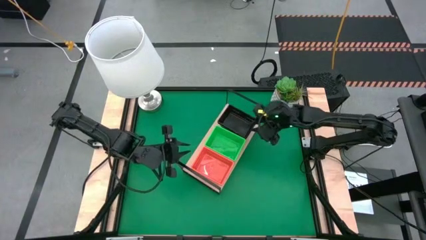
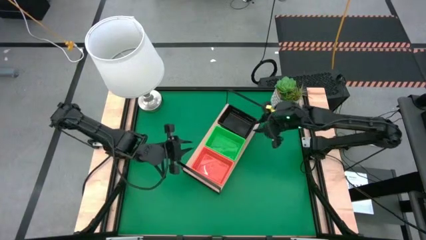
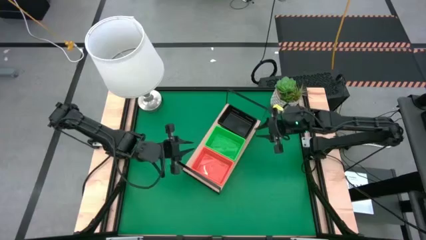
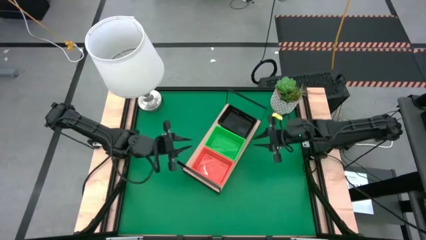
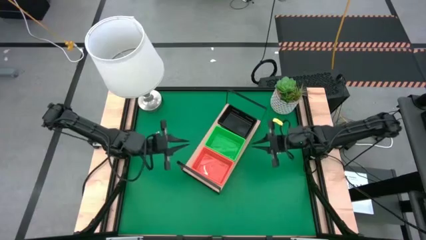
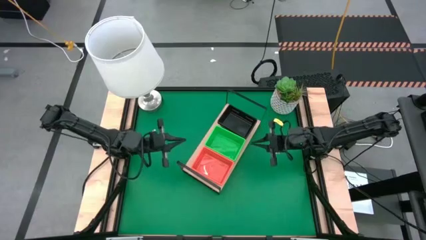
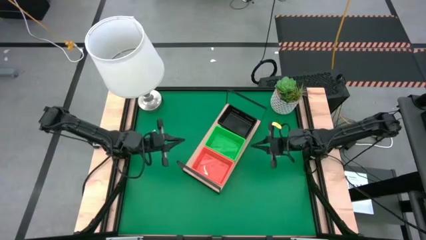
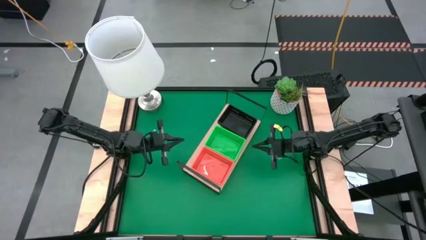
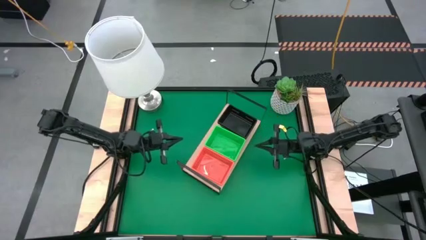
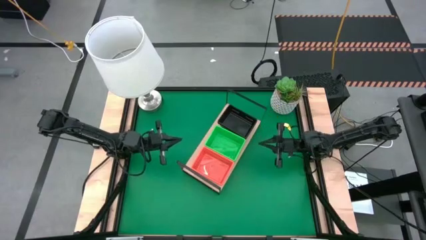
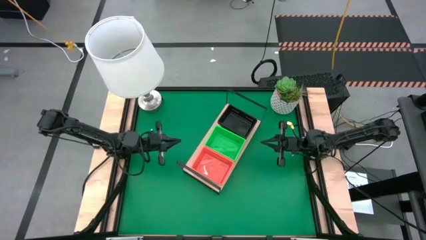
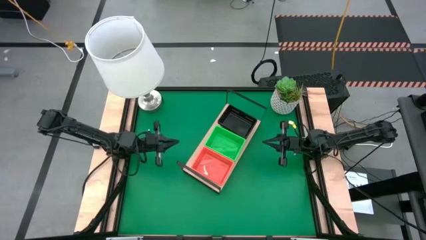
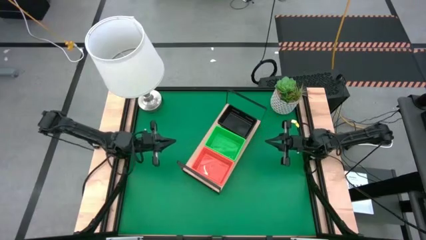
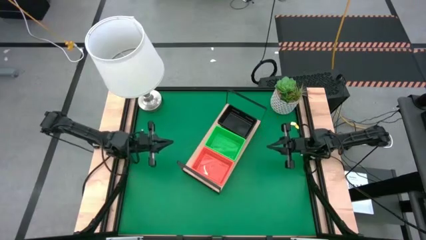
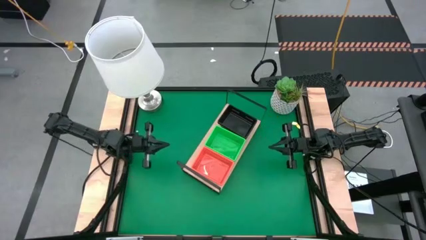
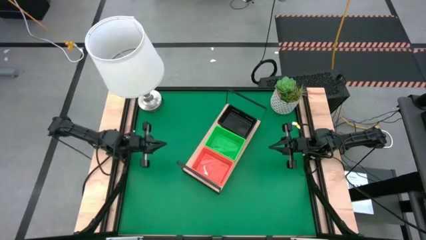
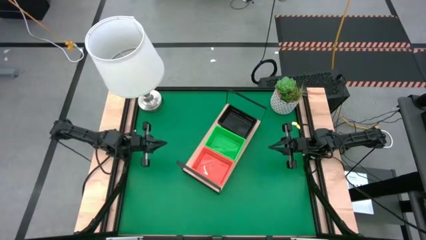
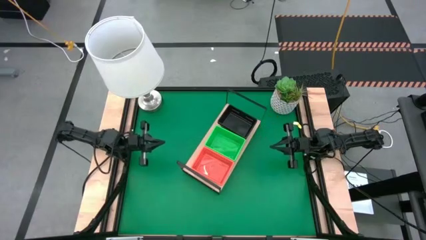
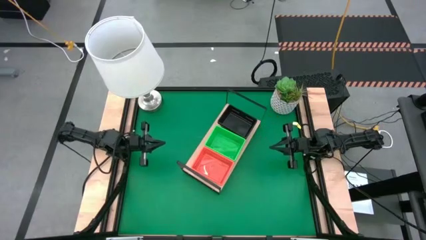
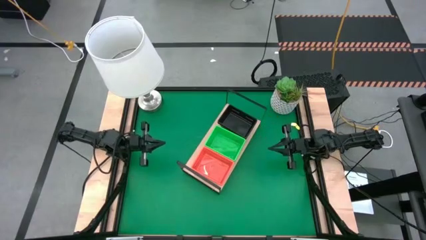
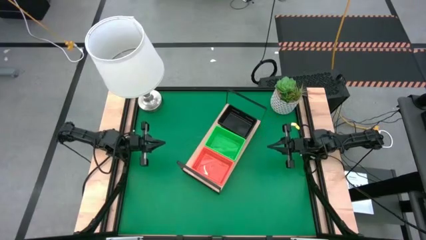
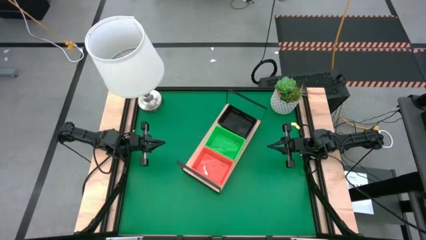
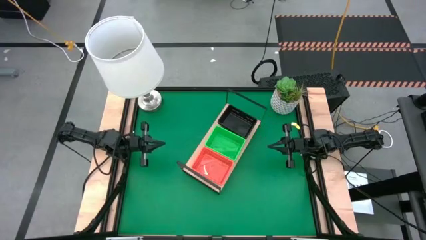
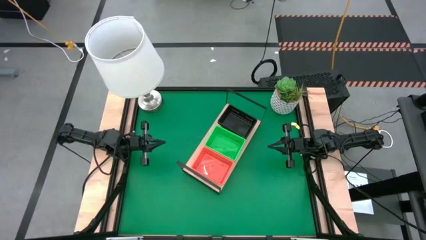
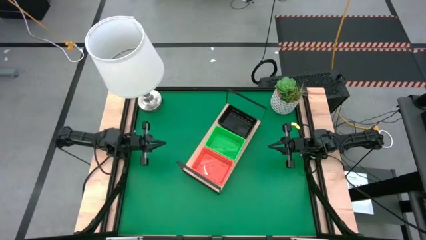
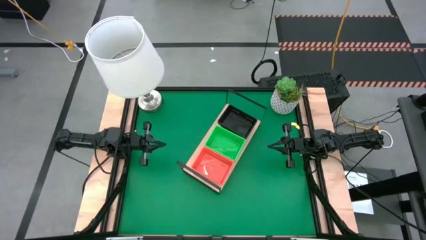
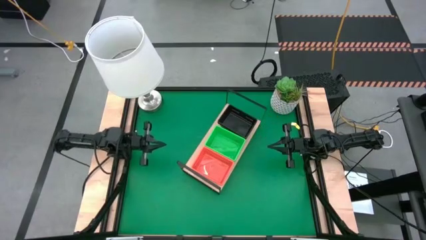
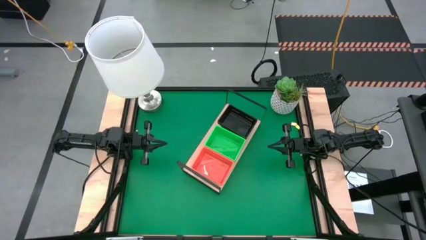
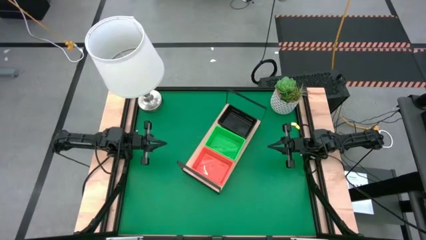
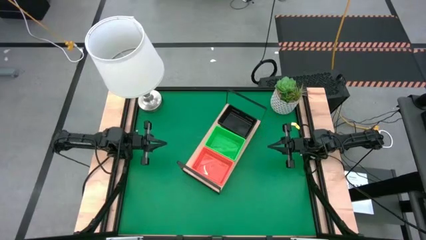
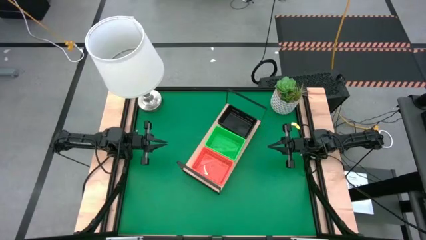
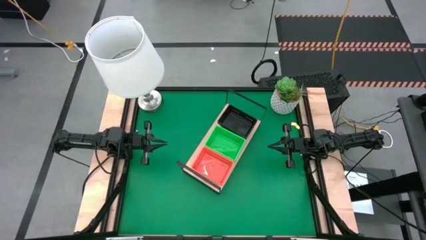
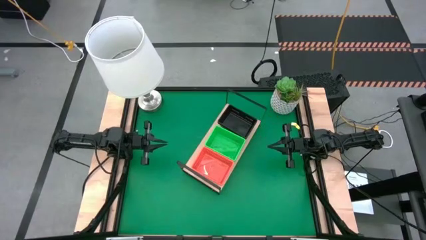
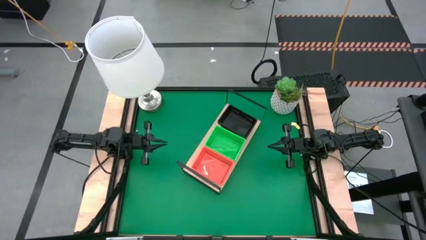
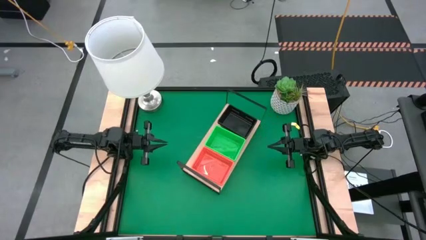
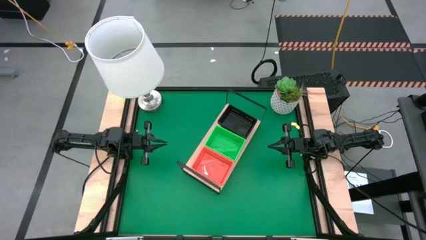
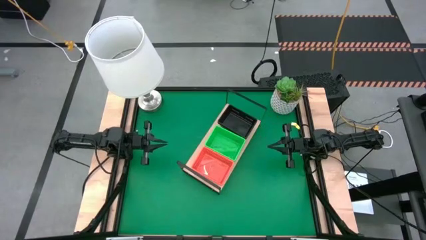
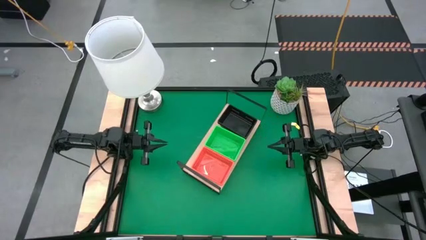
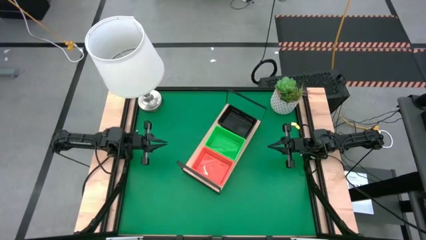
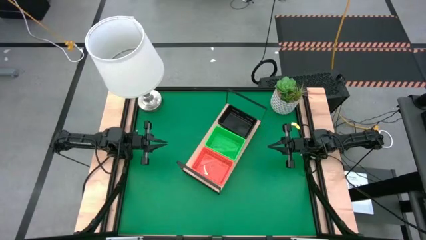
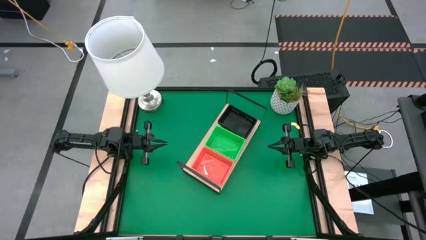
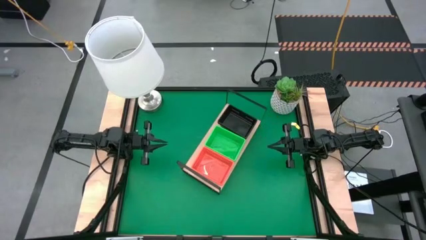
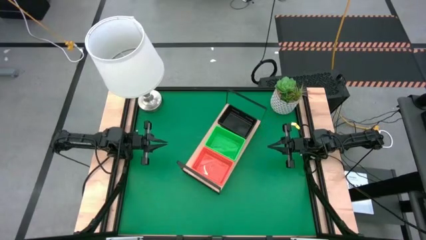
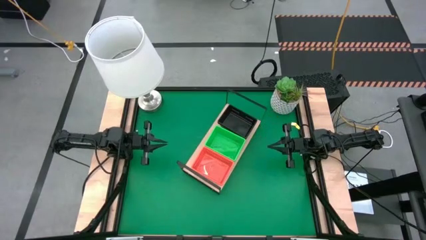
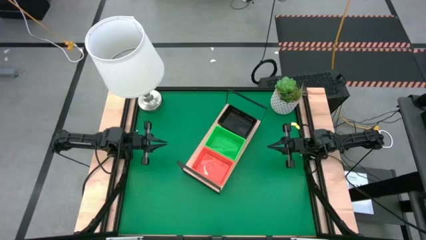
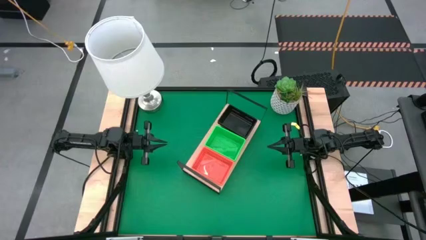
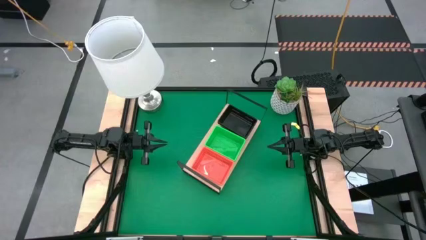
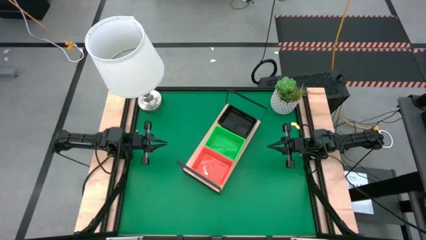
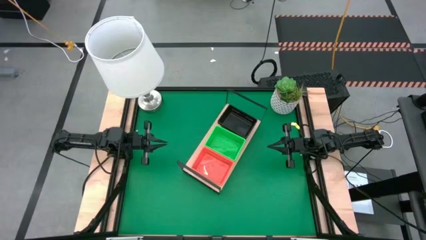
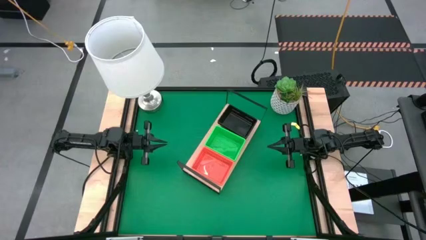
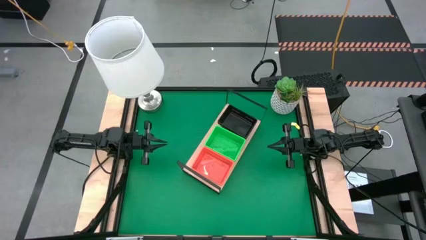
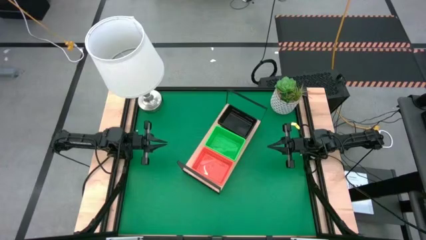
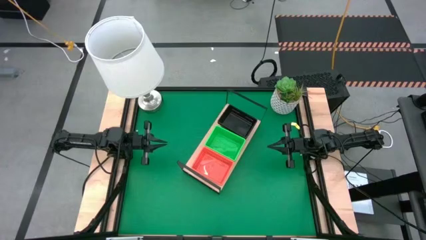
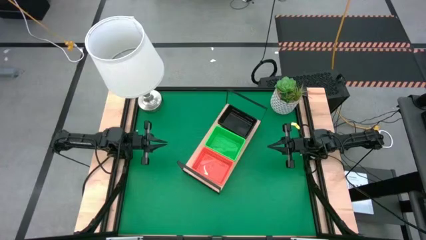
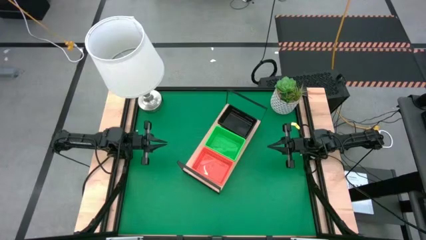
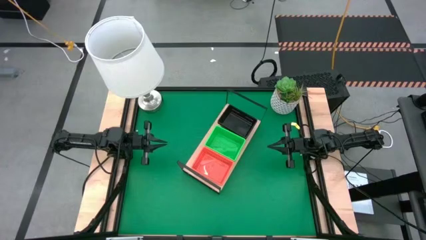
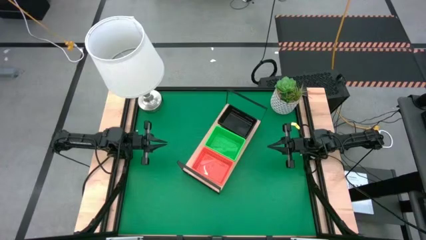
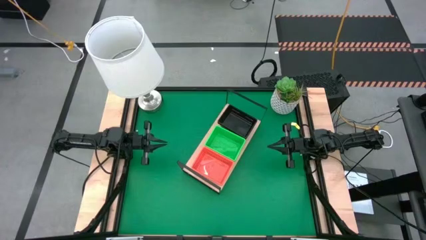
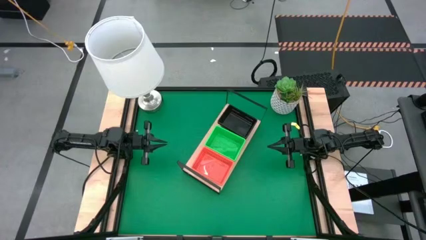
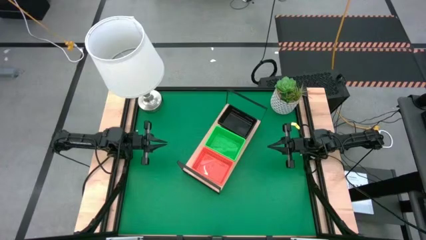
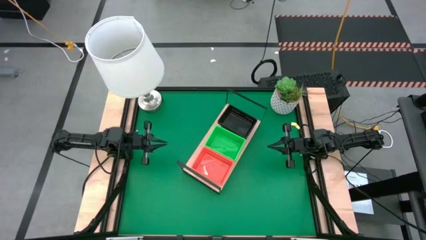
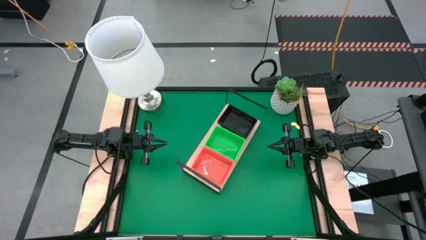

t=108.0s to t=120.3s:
Task: Stack baskets on shelf by color
Return to Home Position
